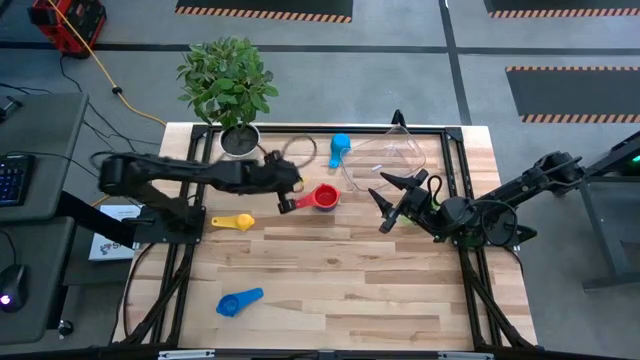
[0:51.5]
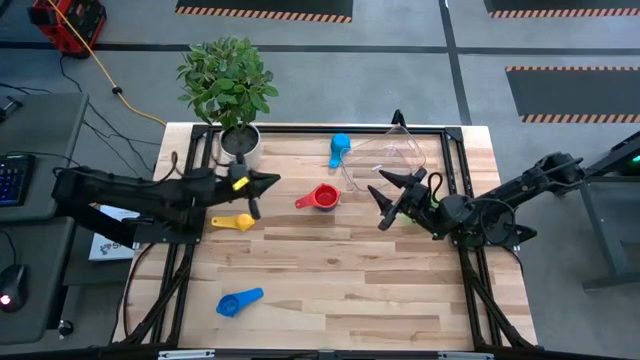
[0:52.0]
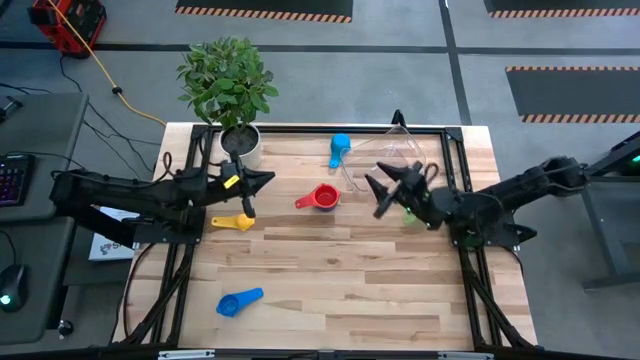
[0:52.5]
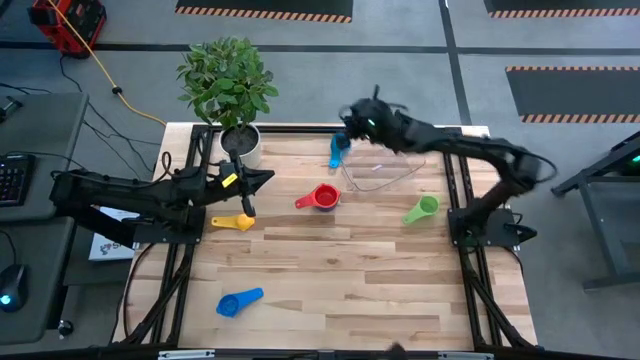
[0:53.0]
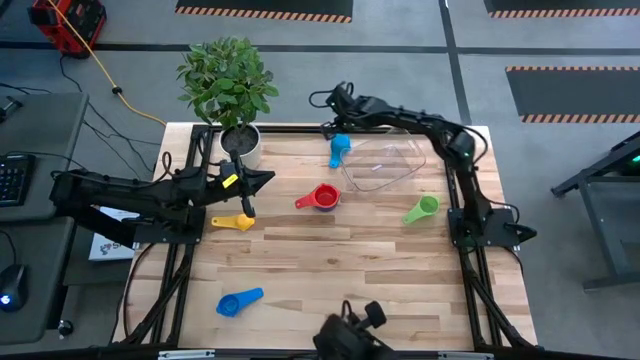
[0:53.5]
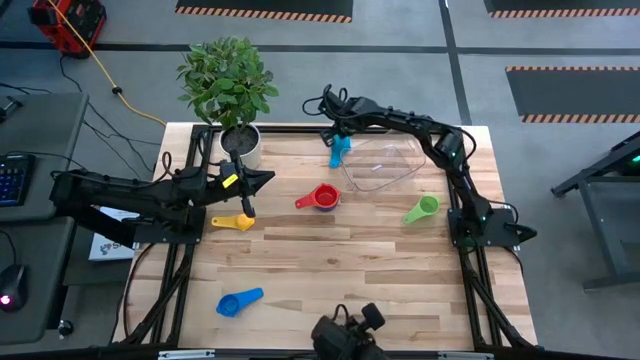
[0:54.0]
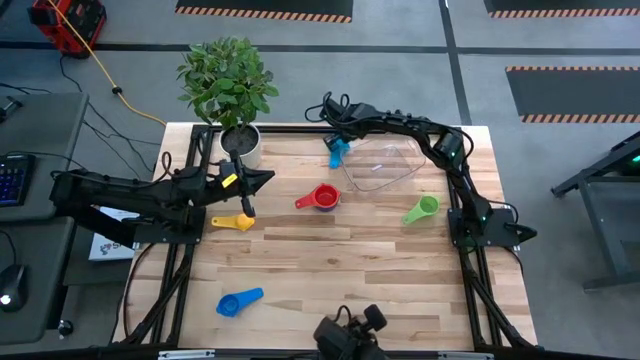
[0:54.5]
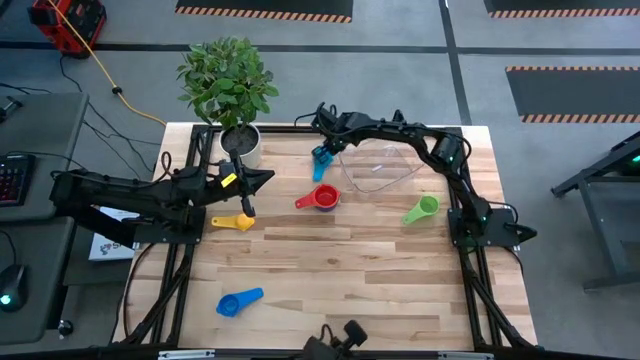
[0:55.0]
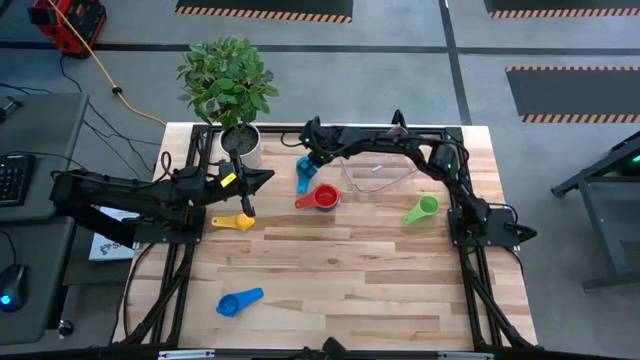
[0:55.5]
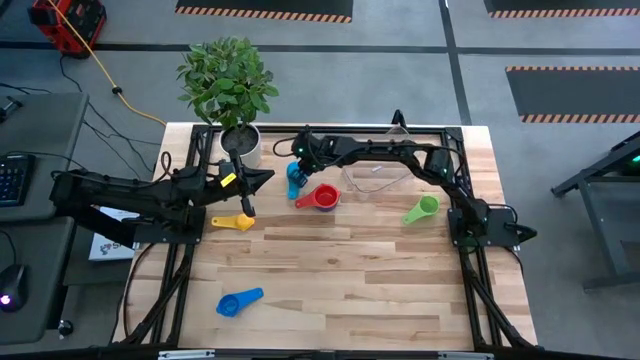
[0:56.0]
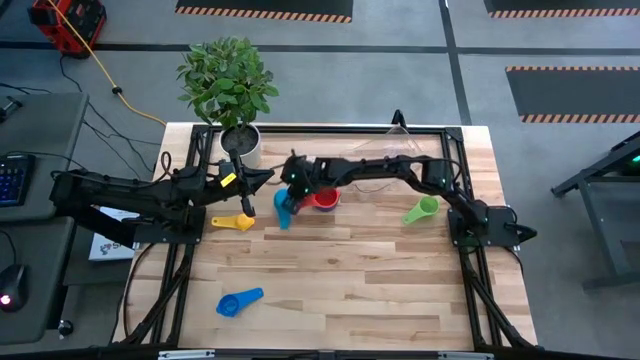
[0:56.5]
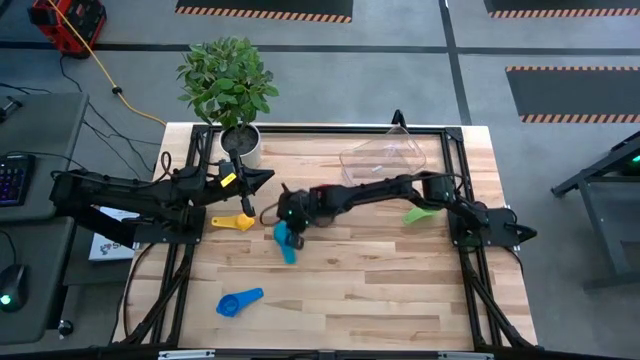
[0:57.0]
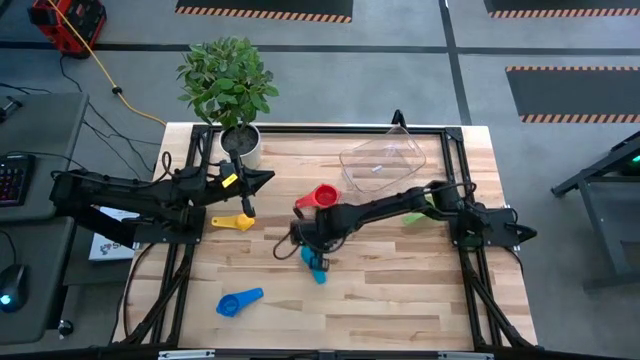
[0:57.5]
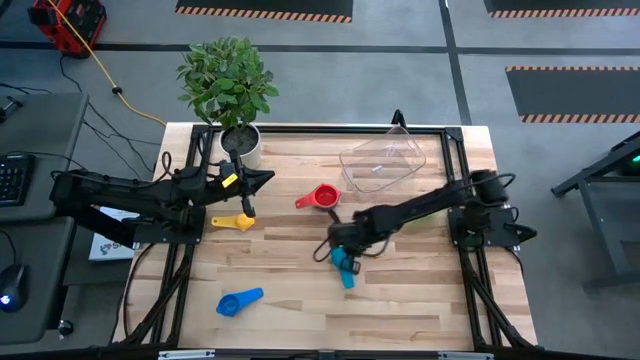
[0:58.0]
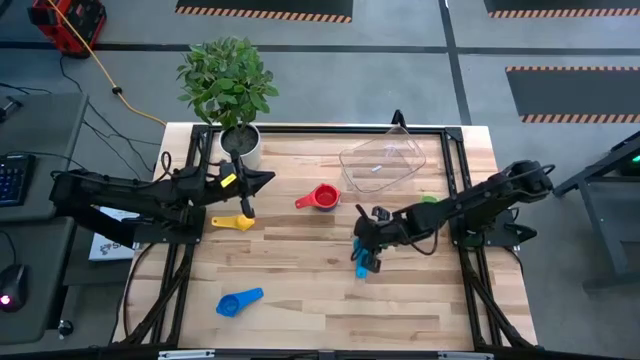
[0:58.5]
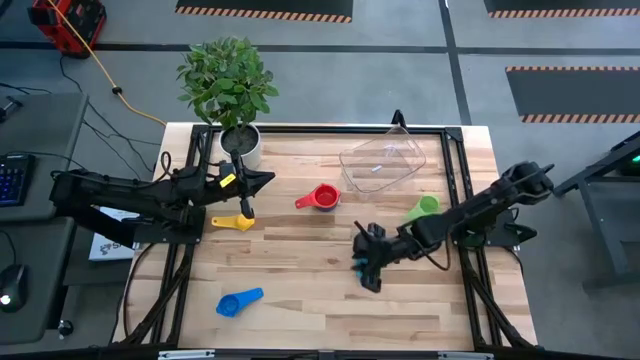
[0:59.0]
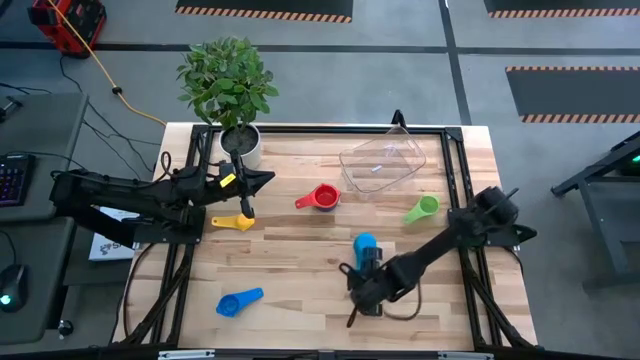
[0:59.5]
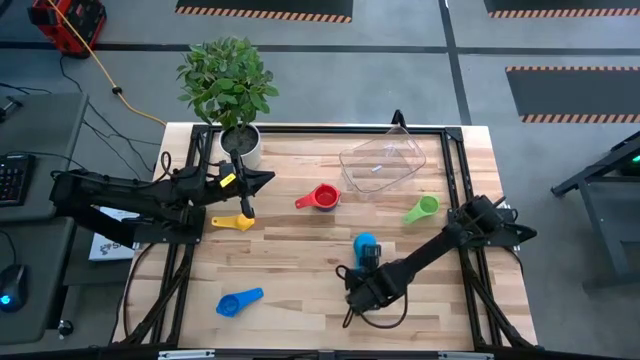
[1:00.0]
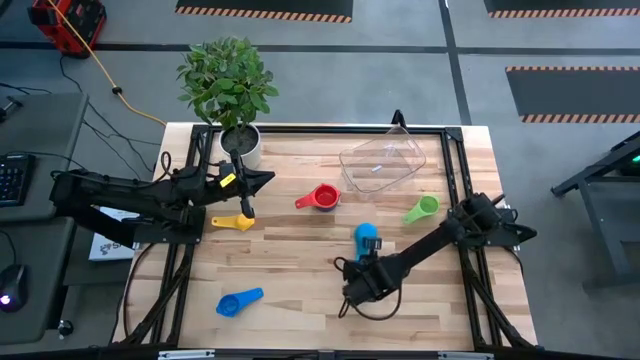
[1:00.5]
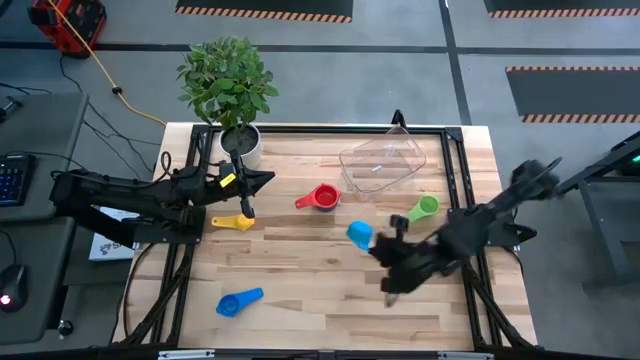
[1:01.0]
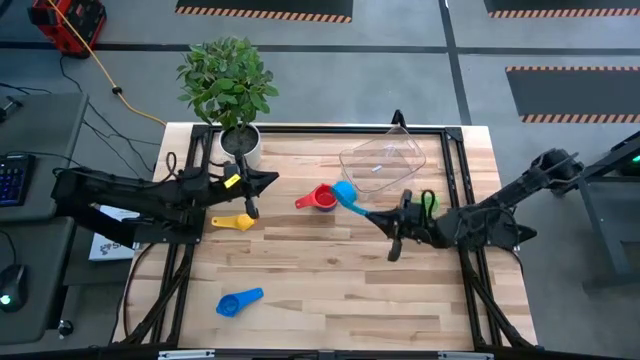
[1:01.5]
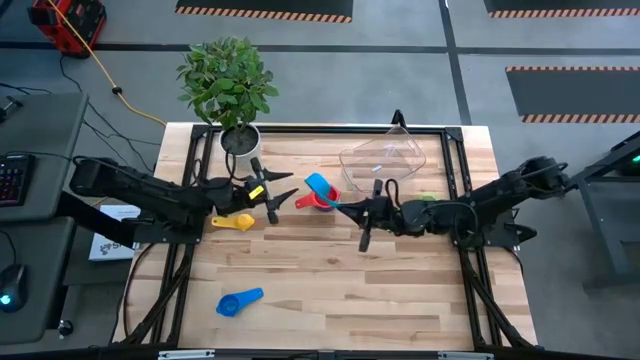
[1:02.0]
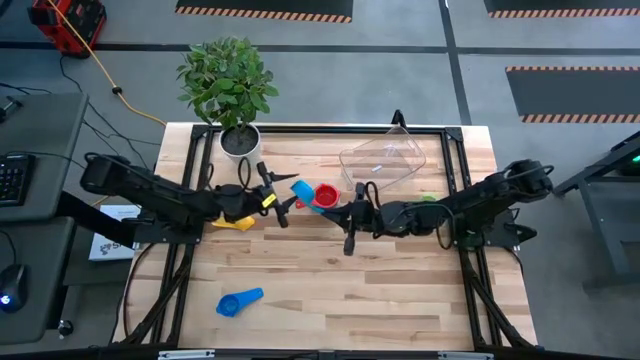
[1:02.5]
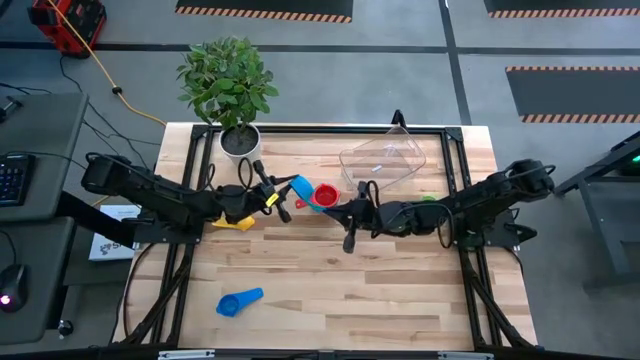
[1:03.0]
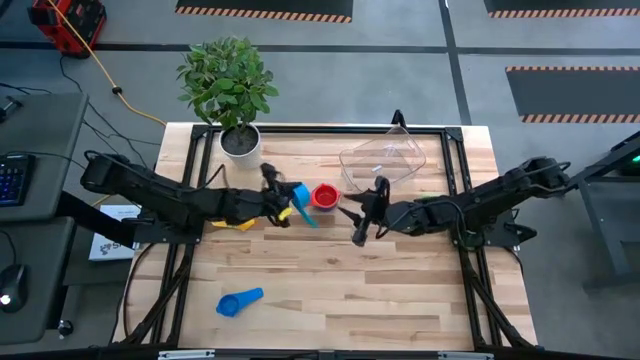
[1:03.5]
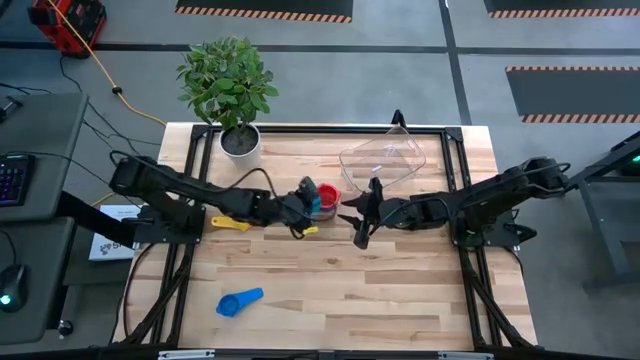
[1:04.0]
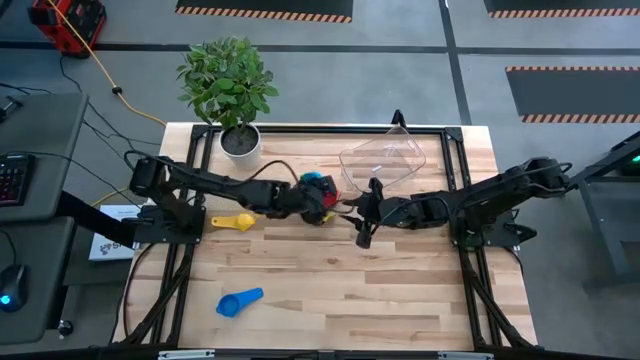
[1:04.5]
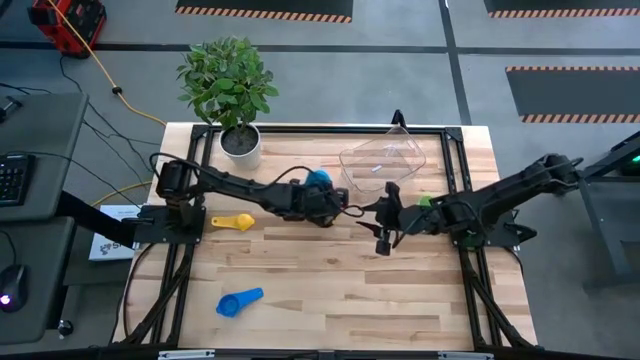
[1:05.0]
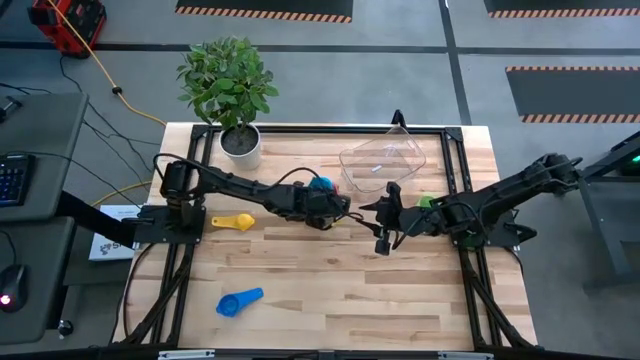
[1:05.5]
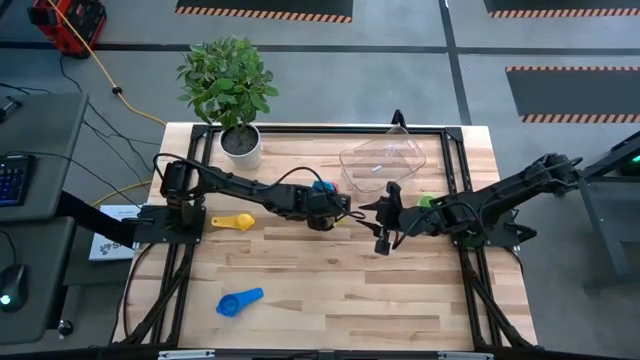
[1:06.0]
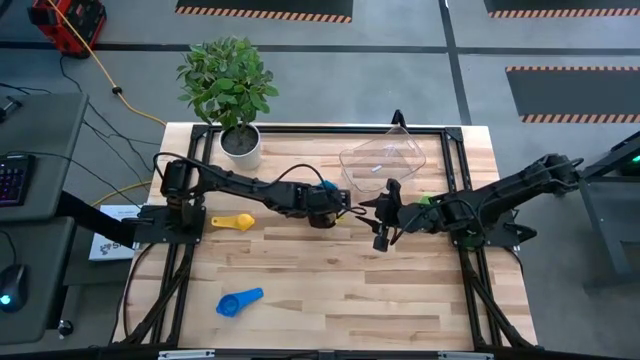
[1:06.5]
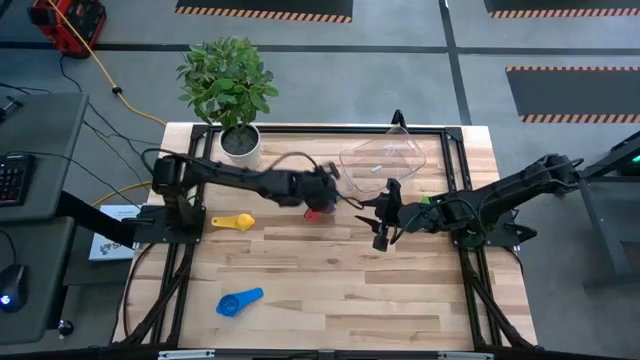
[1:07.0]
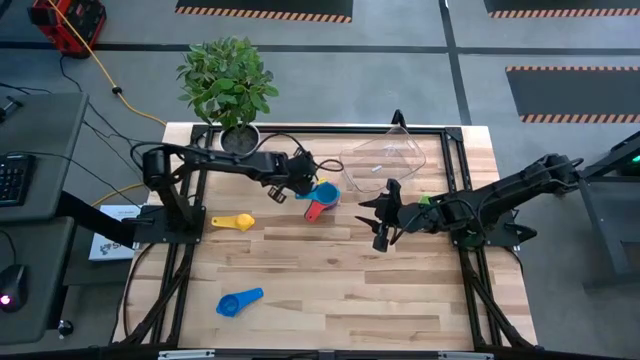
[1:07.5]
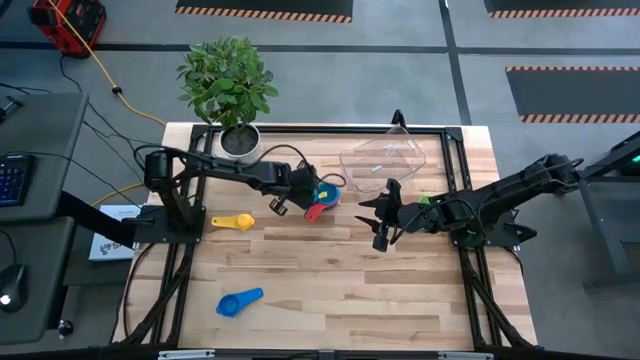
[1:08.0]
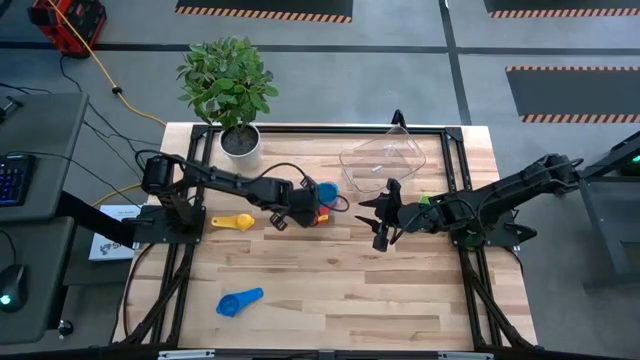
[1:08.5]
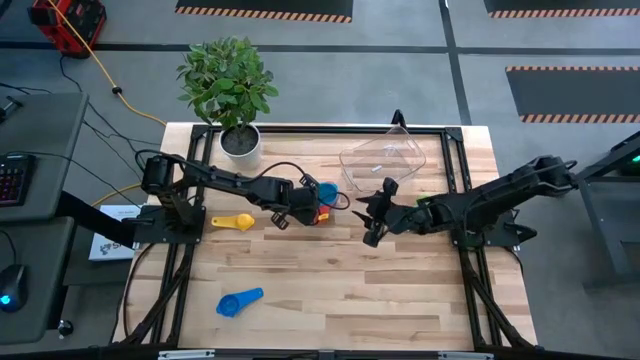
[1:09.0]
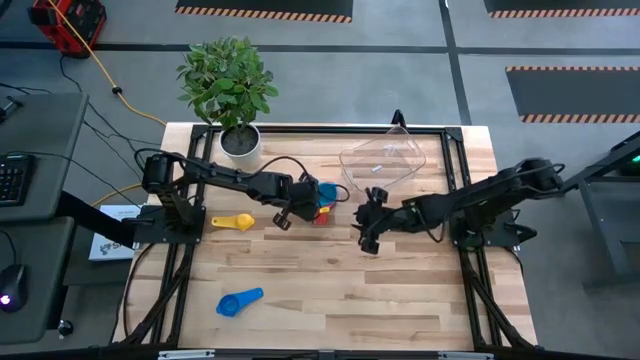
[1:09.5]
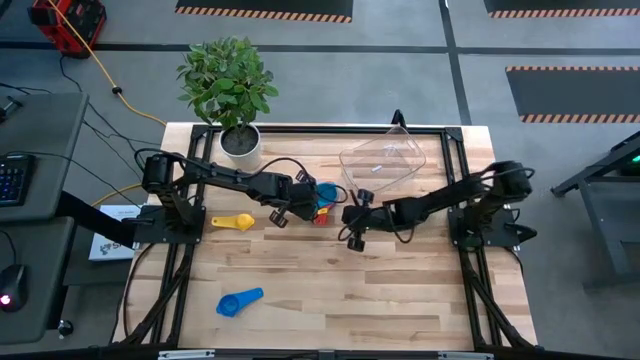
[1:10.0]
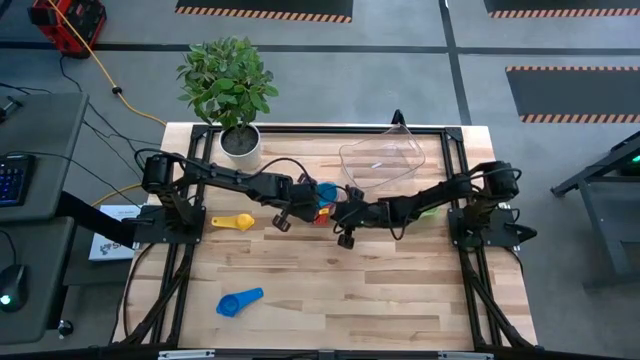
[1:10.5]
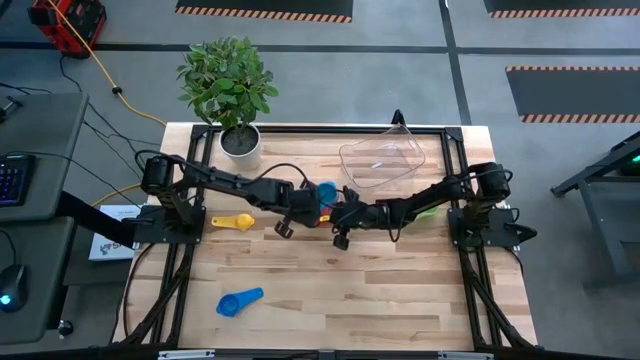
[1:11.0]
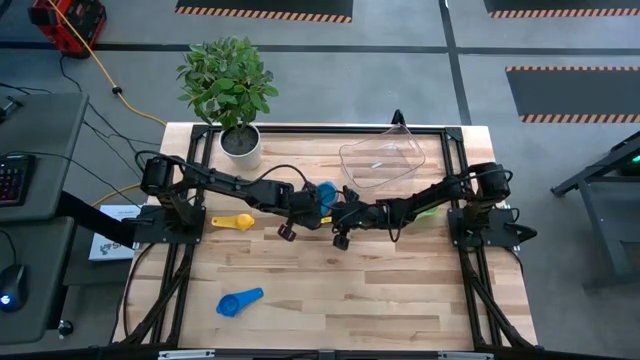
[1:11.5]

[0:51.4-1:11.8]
Task: Nest measuring cups in basket
Stack the light blue measuring cup on top of the red measuring cup

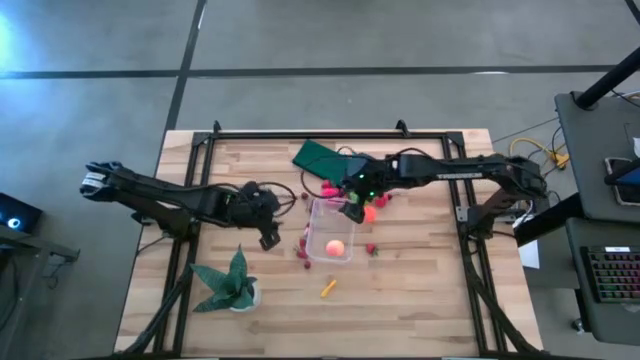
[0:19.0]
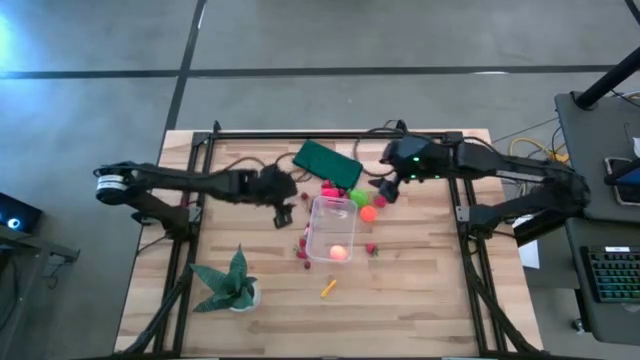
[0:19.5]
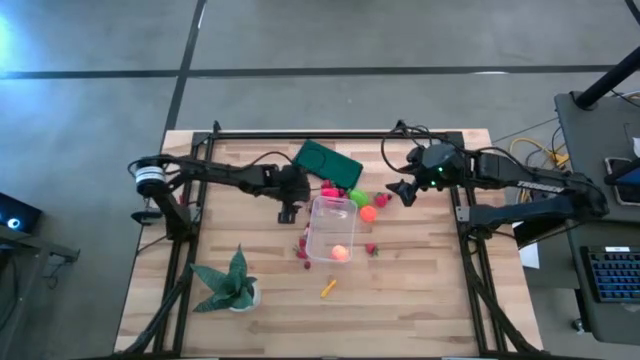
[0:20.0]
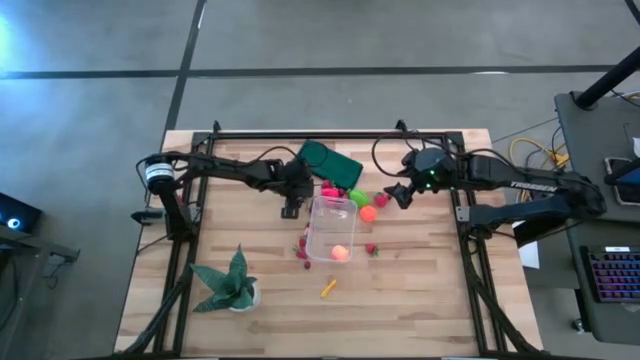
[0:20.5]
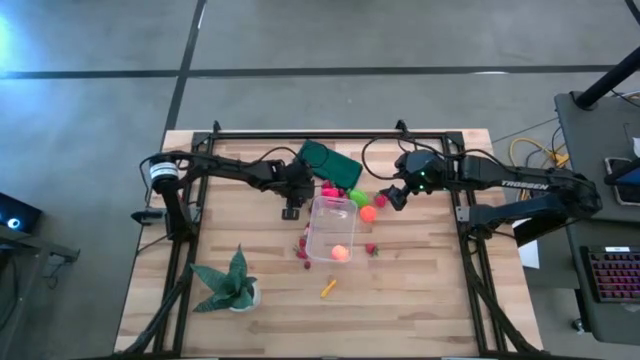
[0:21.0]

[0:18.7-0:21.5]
Task: Pick and placing Produce into tupperware
Put the red cherry into the transparent bin
